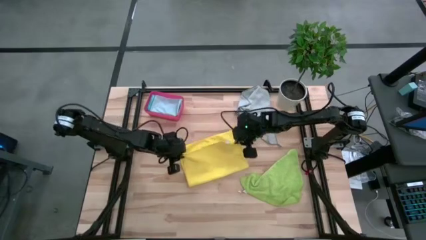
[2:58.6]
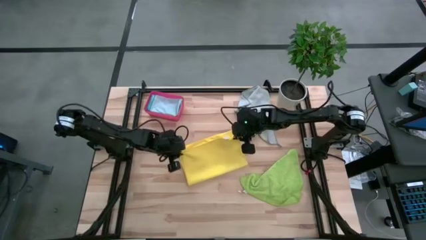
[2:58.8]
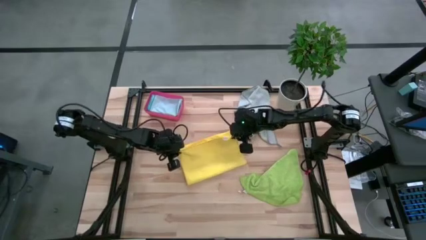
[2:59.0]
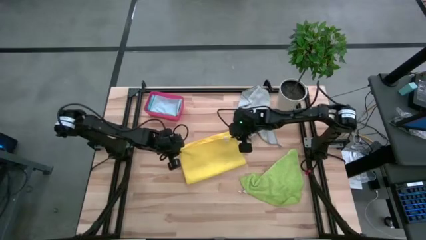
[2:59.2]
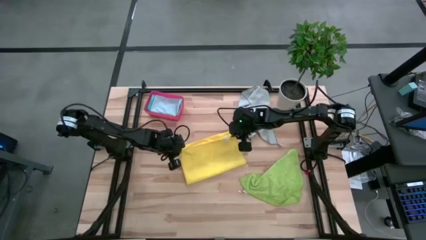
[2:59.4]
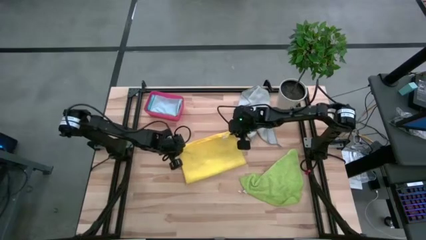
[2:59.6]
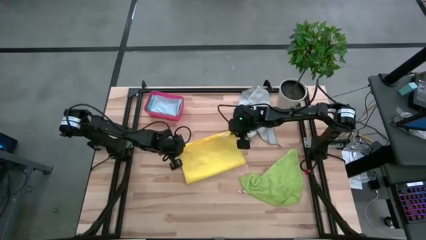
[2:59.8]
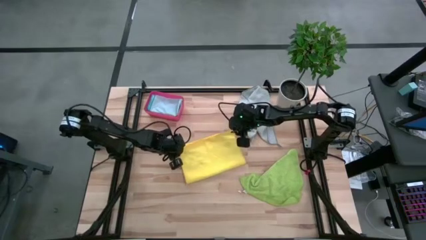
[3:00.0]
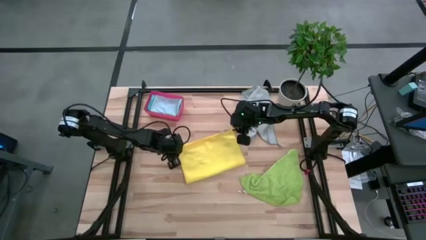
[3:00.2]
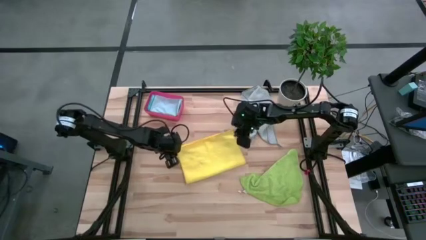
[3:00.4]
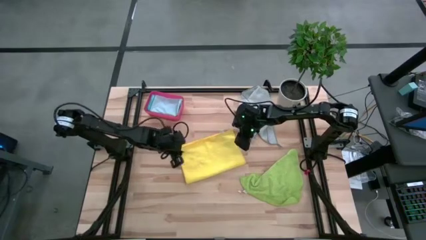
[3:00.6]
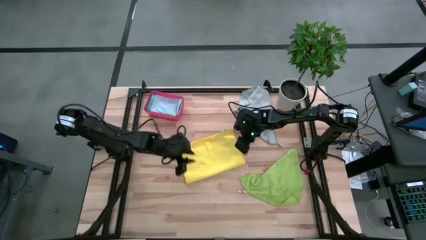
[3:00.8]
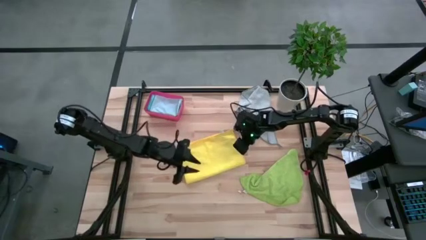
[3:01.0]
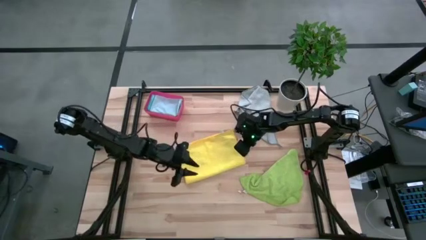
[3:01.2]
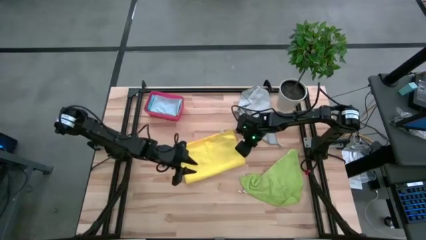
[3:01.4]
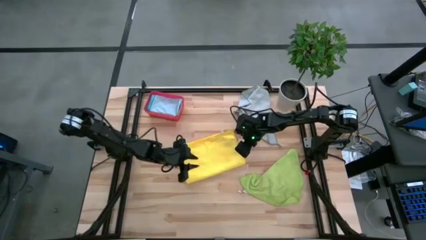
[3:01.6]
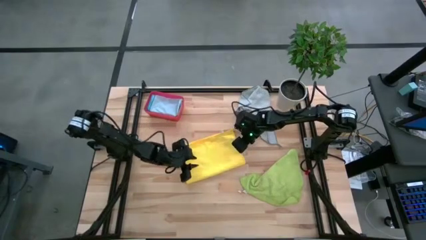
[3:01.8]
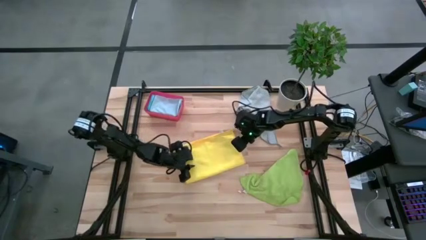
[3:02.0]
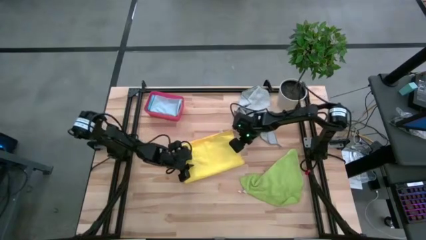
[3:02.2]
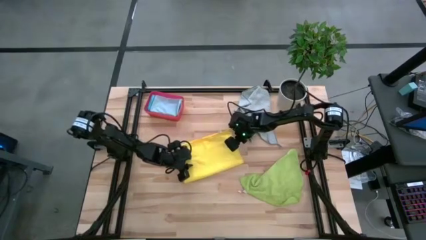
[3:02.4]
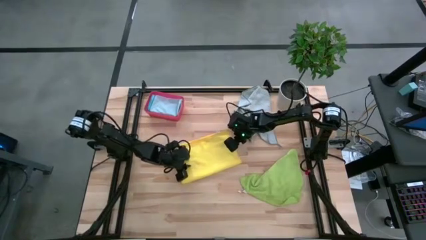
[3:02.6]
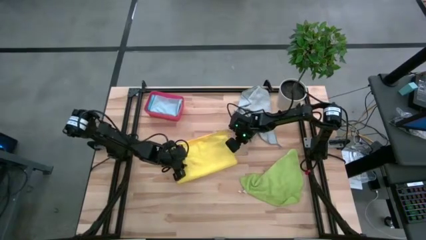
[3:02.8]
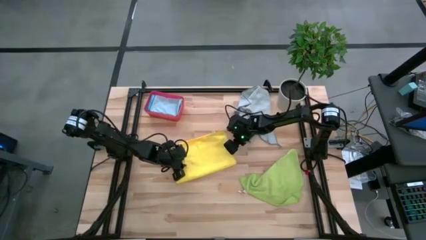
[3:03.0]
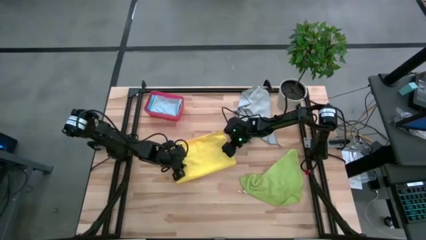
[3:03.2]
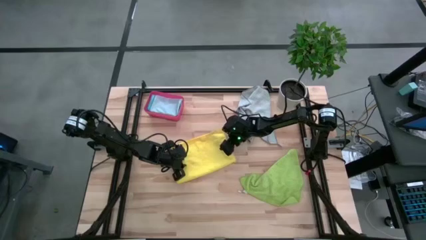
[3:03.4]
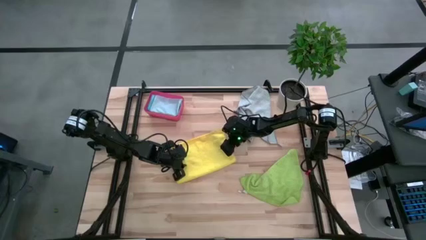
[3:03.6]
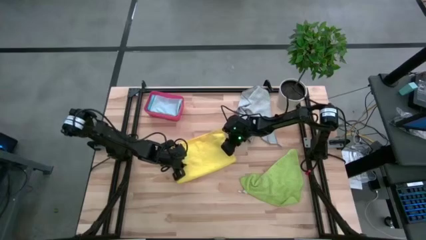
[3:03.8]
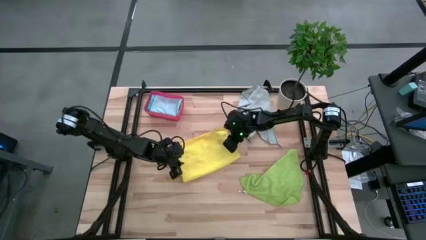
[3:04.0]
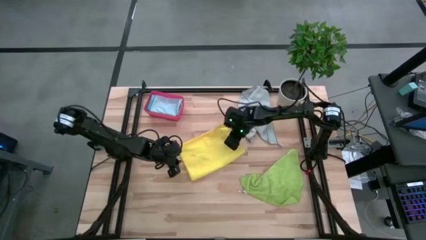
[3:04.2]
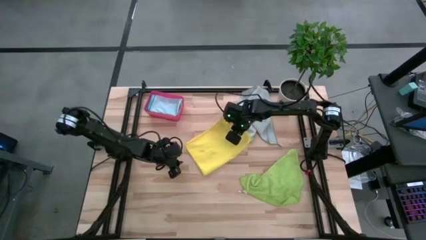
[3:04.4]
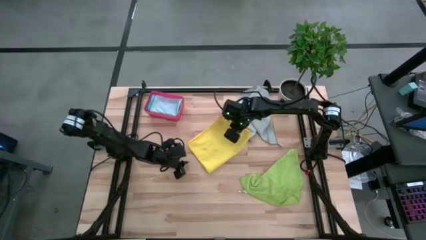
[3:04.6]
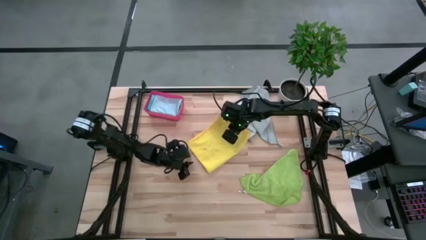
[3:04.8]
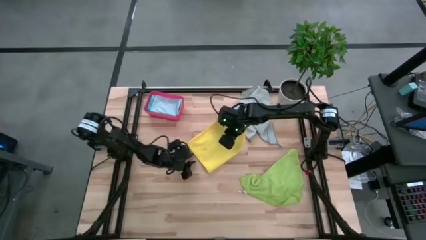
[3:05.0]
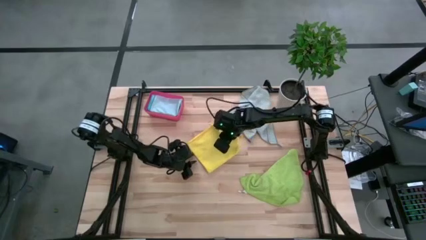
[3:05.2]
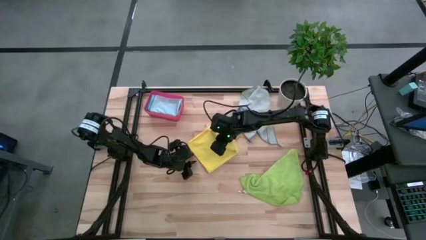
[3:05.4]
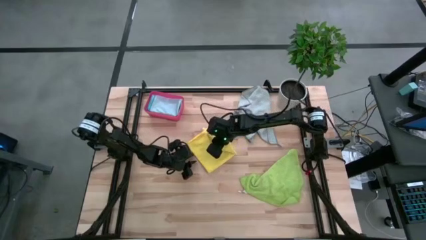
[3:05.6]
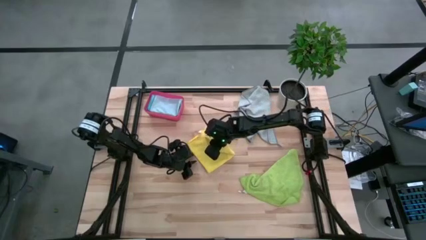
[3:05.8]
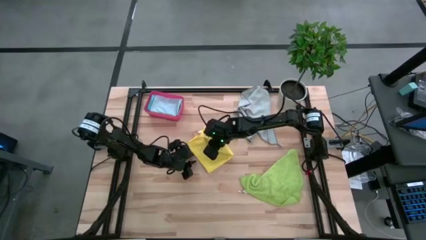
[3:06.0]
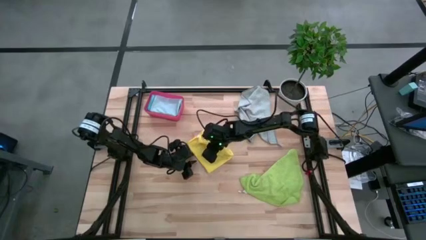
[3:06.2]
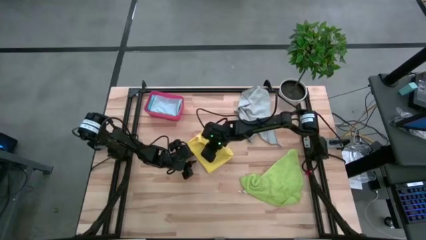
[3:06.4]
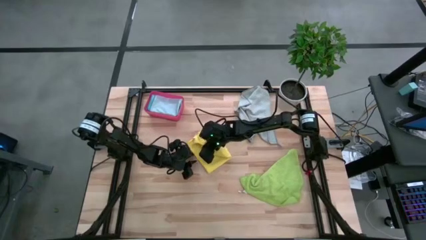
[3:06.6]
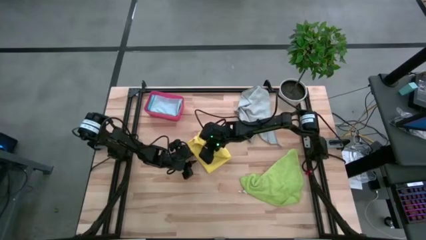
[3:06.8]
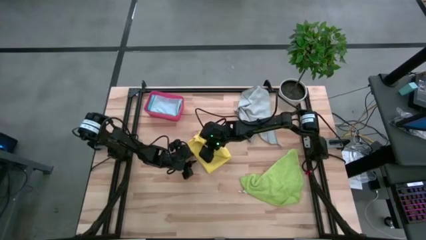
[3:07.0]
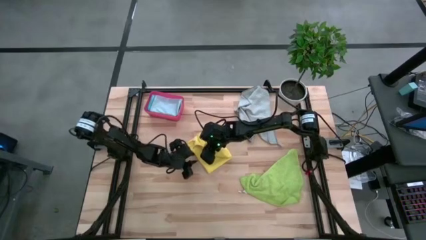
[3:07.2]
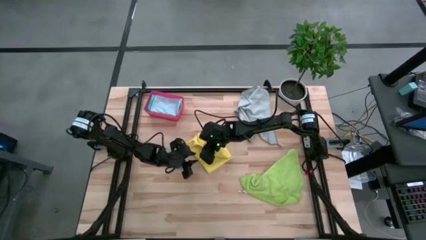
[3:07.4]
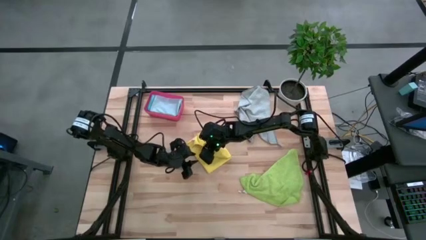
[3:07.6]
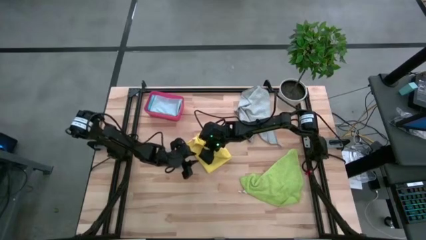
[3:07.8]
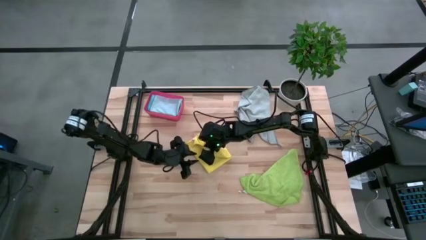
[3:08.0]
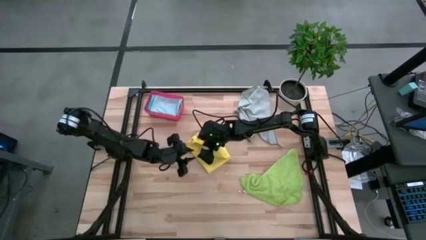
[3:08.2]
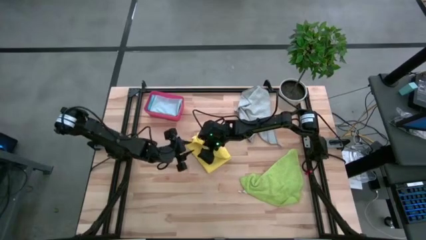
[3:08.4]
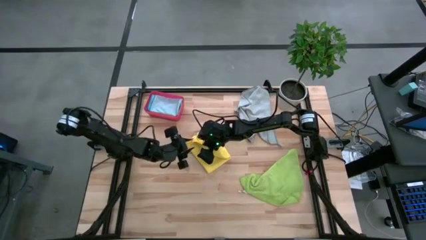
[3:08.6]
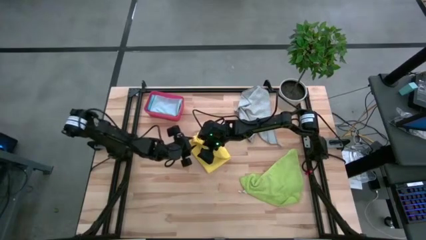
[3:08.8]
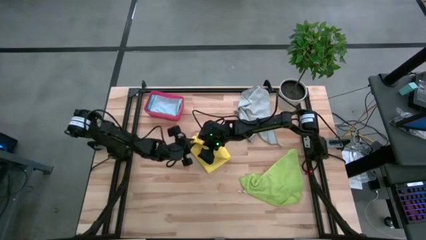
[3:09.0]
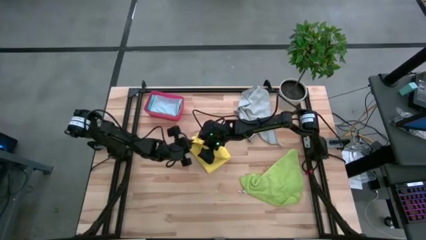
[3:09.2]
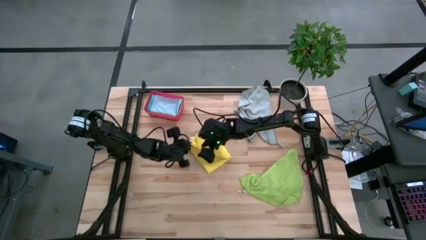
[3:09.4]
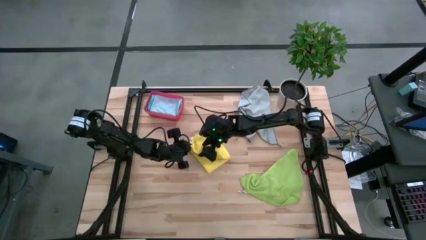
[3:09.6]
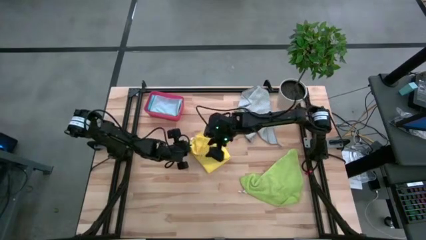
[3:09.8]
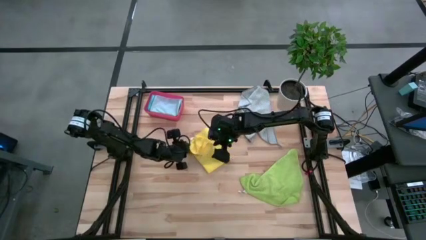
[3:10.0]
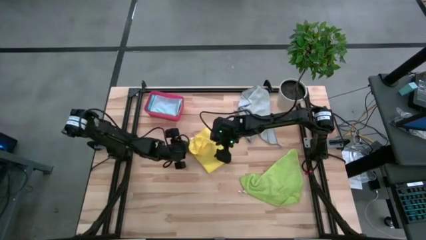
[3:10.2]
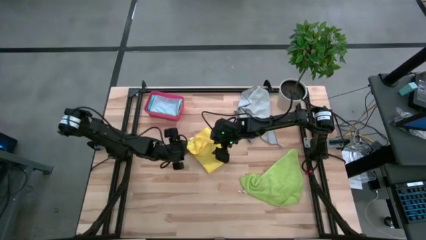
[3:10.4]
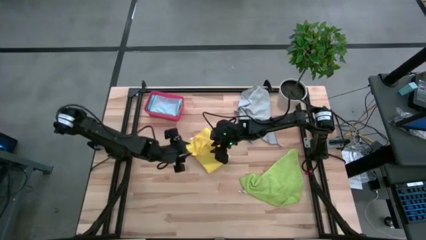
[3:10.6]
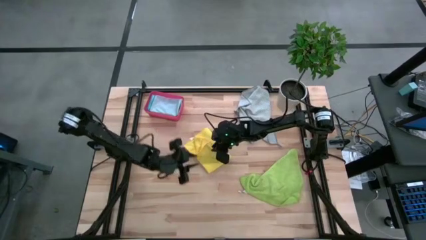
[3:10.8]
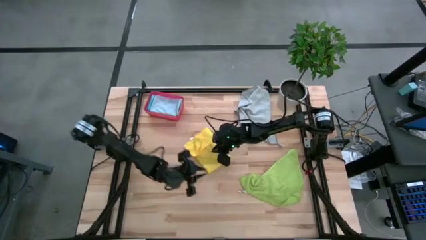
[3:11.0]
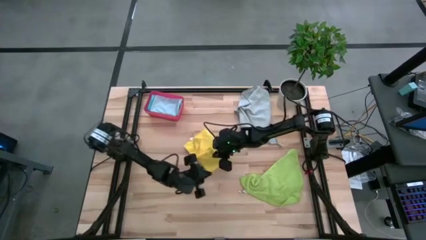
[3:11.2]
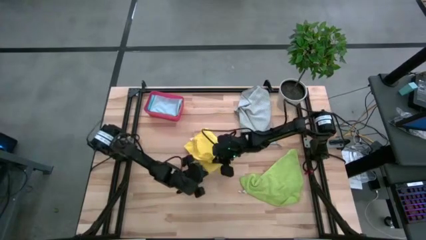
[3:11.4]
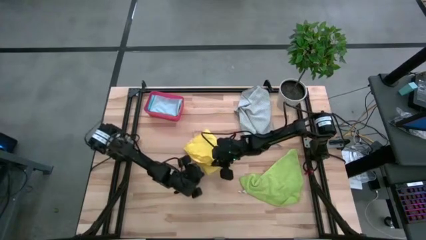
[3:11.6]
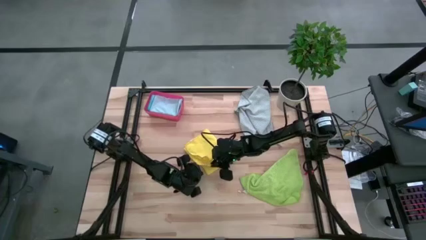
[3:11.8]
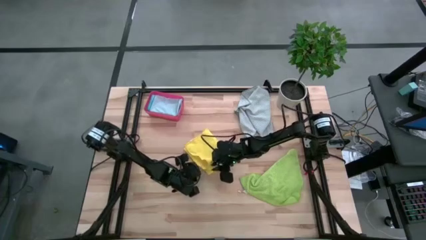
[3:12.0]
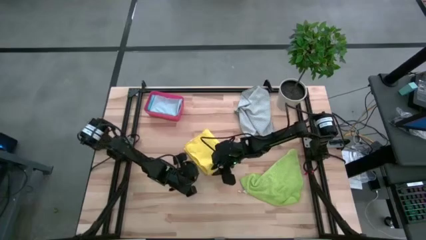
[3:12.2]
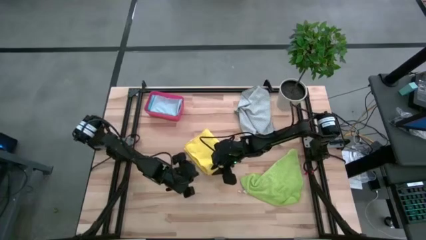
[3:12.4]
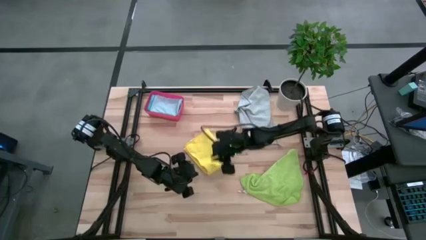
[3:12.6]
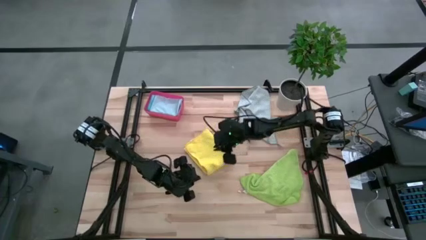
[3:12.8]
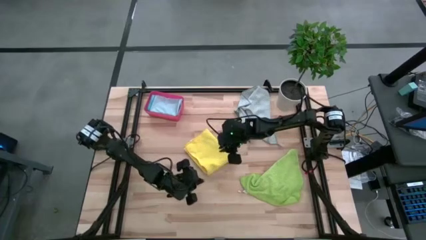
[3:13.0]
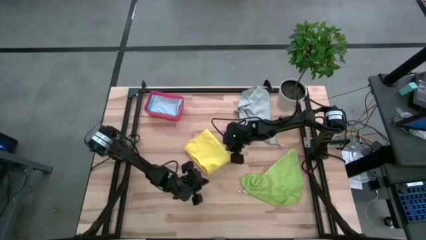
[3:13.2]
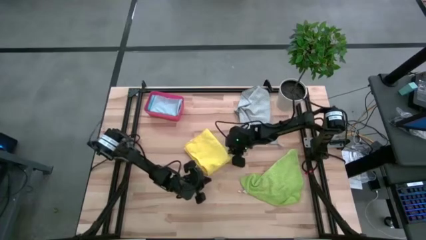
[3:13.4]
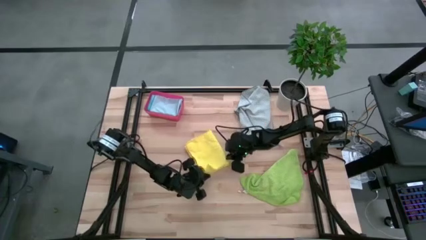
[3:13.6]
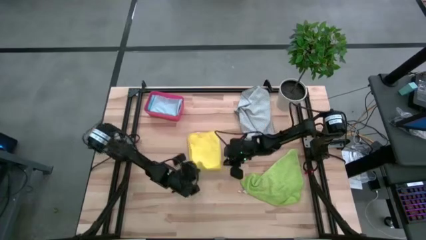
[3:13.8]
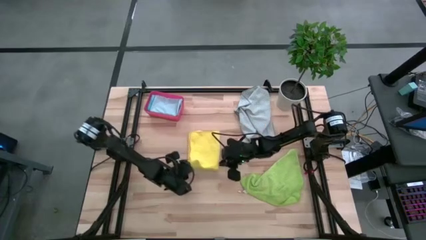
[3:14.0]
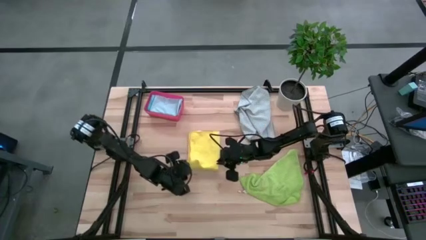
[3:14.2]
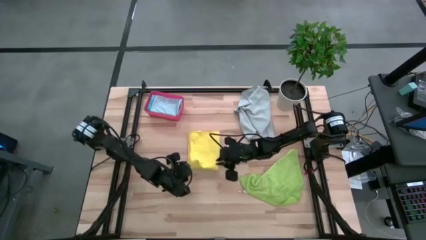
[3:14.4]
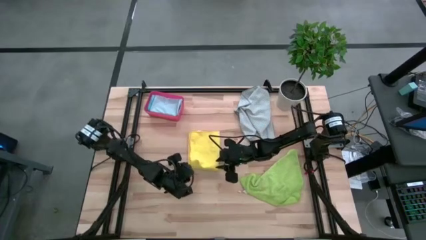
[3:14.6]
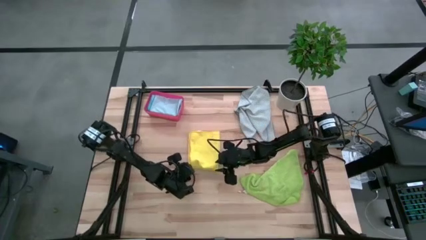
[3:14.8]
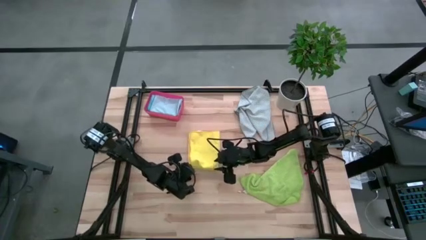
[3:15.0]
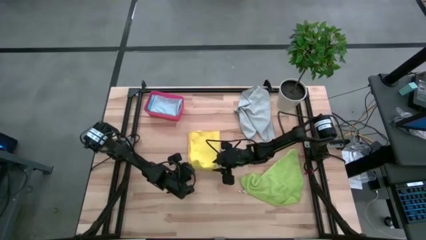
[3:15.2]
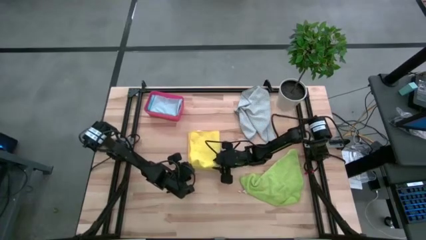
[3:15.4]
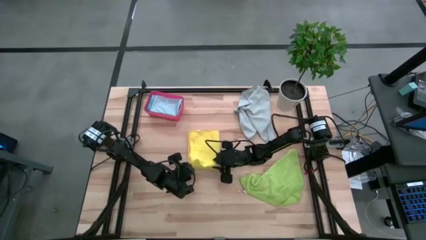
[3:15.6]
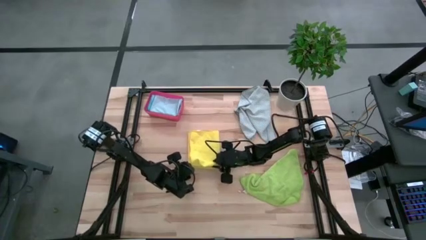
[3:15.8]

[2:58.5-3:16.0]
Task: Fold microfiber towels
Fold the yellow microfiber cloth
